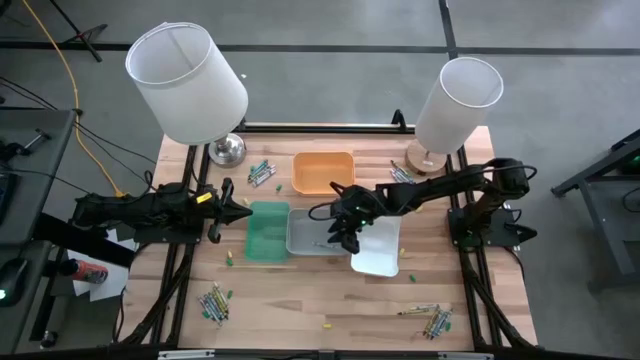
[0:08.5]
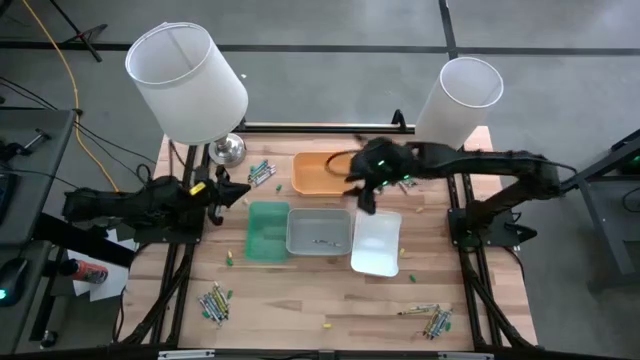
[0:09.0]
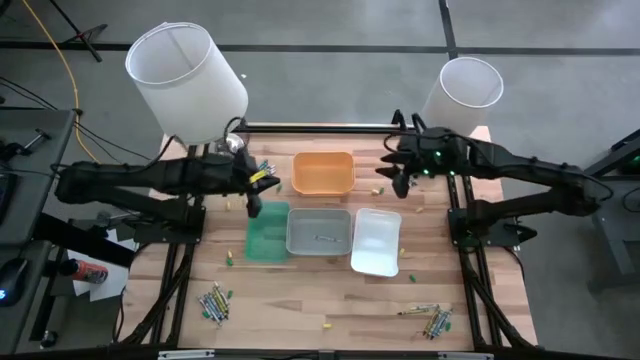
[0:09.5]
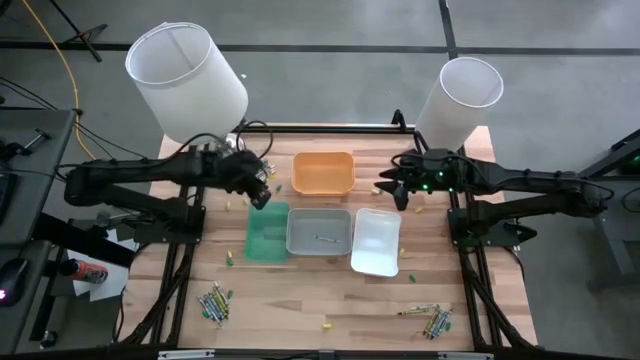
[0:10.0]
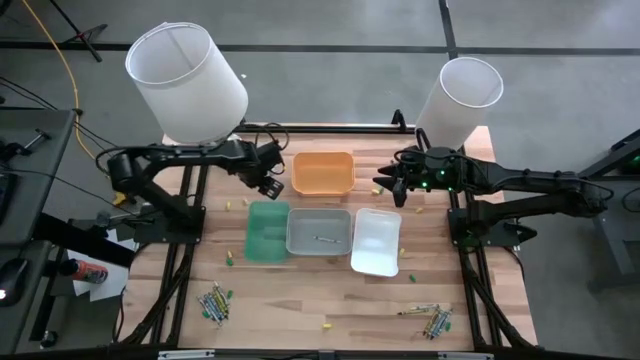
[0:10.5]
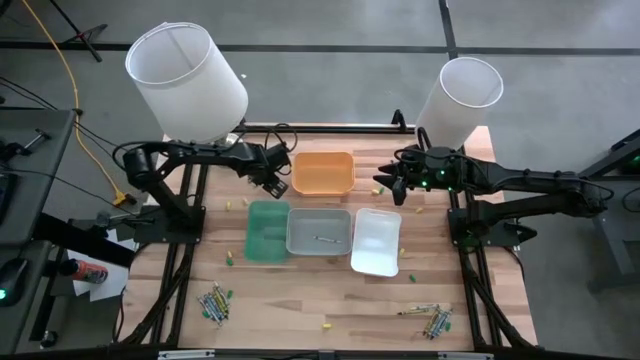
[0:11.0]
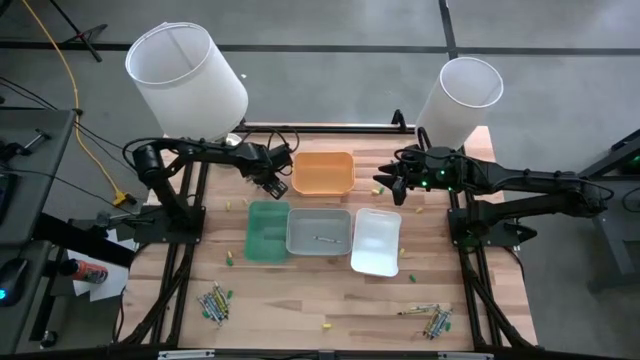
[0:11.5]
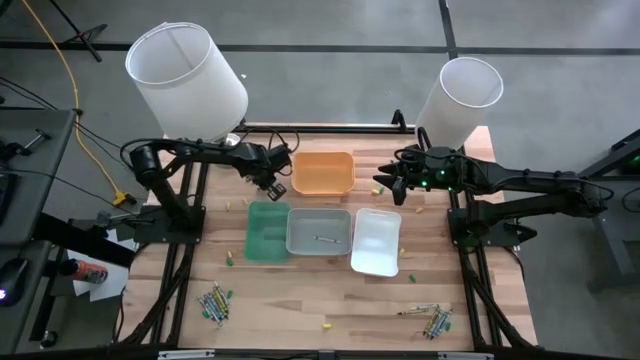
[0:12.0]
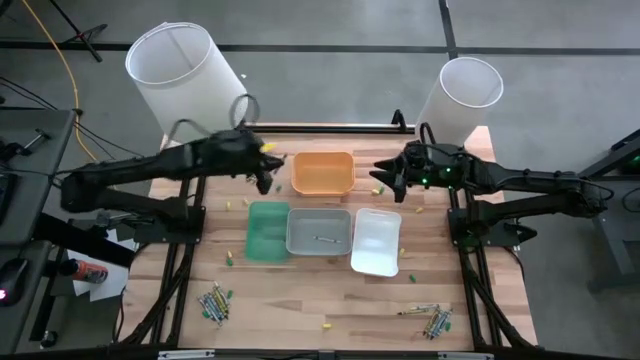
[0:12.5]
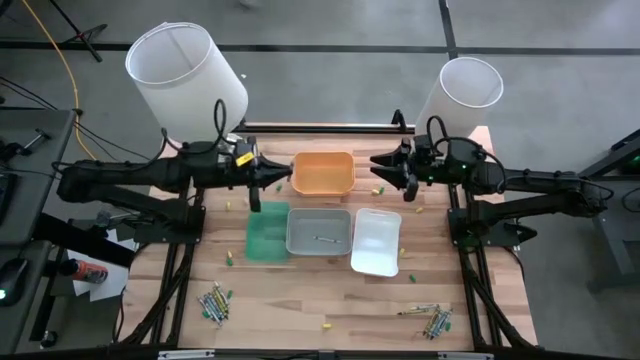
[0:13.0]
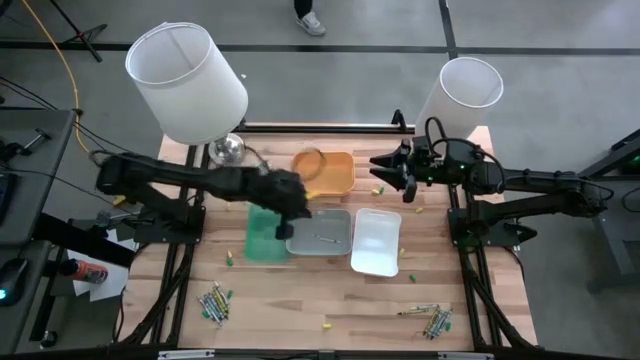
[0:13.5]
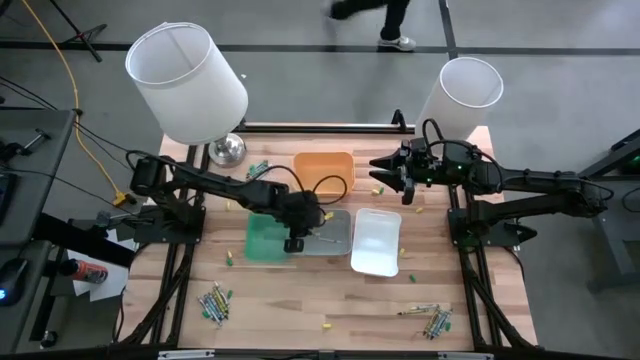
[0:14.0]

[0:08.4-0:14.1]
Task: Sort crayons
Put the white crayon into the gray bin

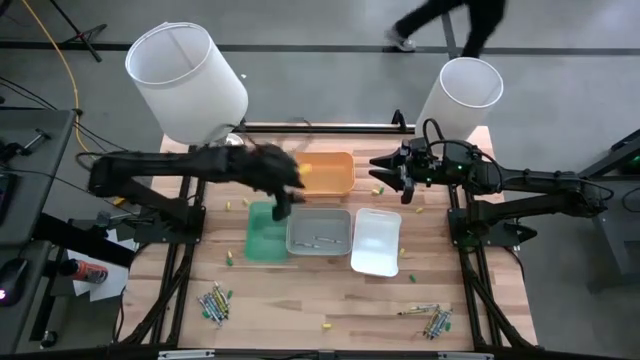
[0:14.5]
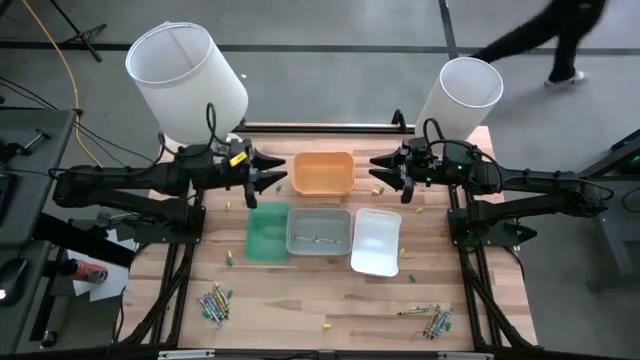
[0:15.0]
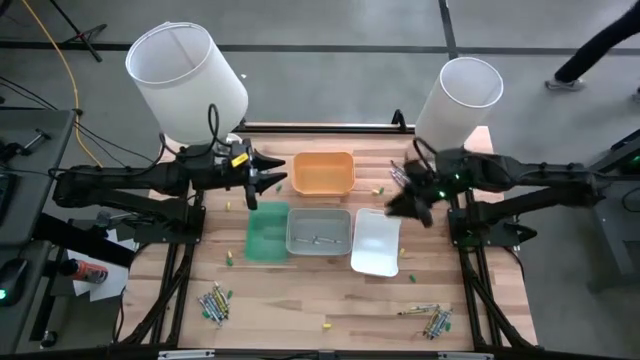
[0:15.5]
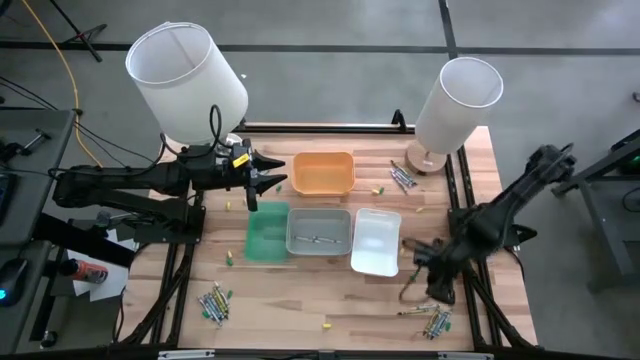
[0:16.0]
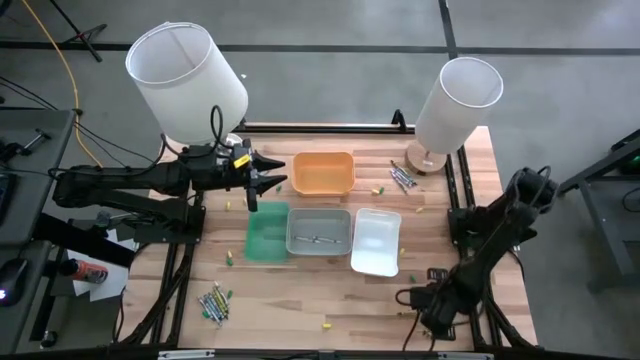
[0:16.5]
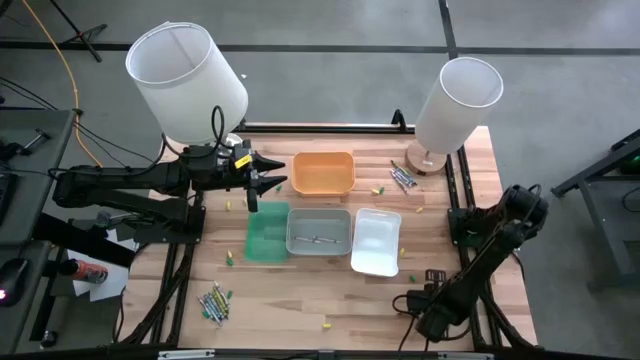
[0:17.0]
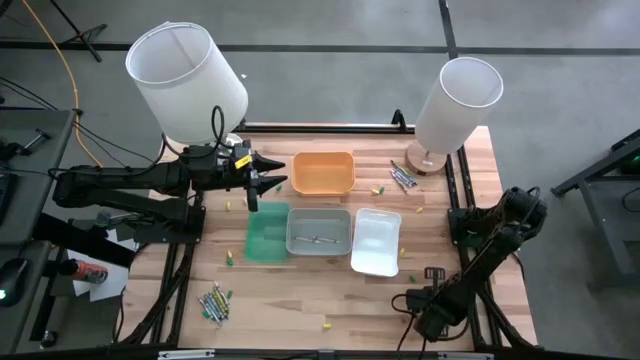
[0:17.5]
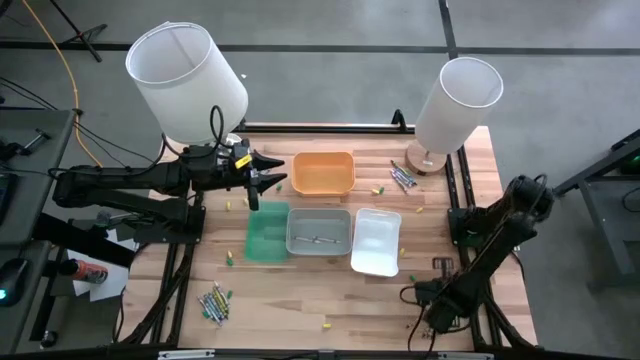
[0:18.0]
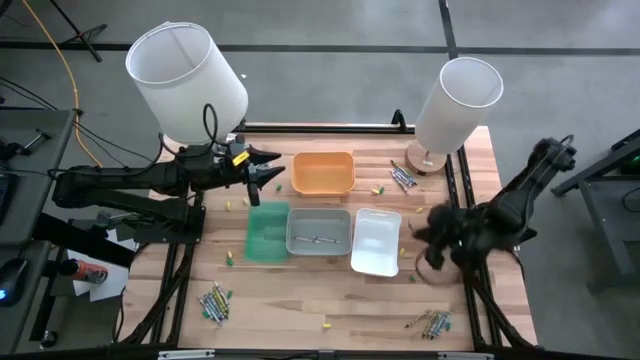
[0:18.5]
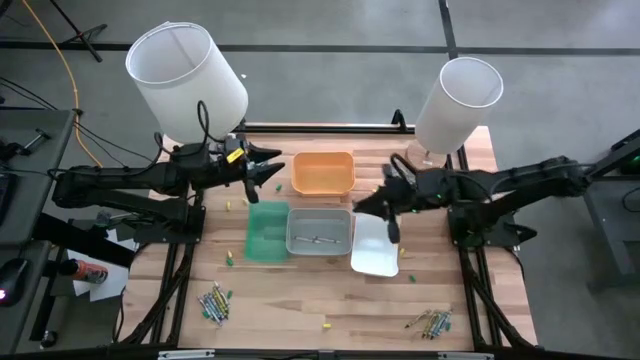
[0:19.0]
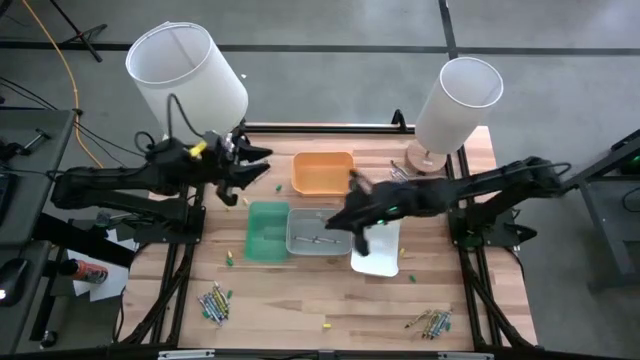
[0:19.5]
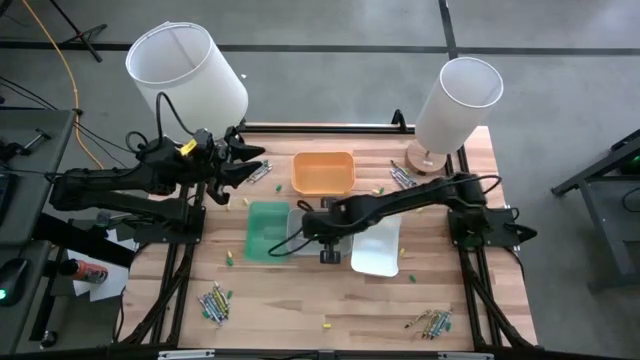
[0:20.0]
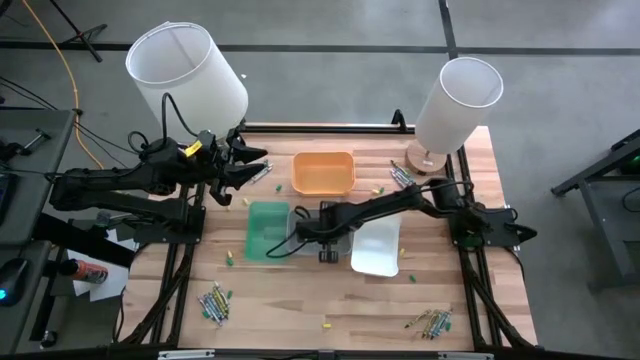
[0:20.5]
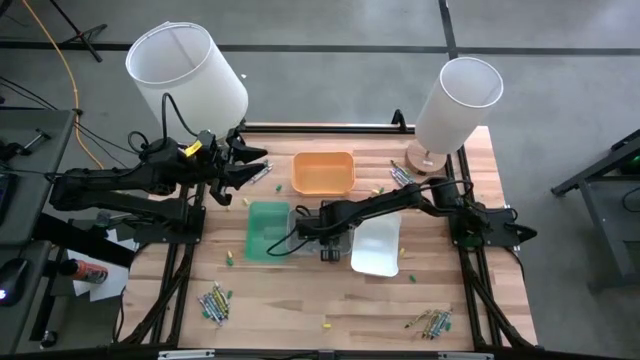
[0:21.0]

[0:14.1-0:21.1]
Put the white crayon into the gray bin

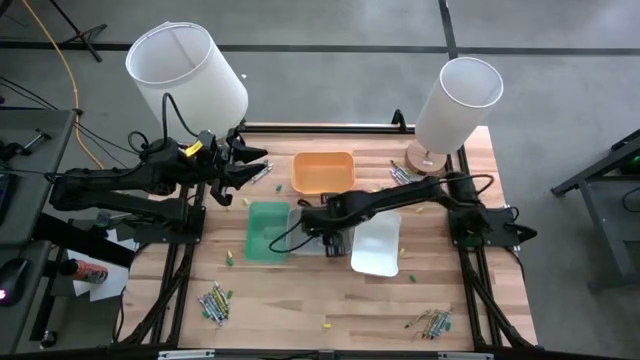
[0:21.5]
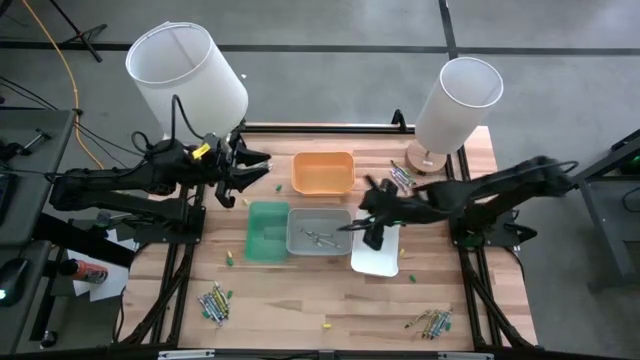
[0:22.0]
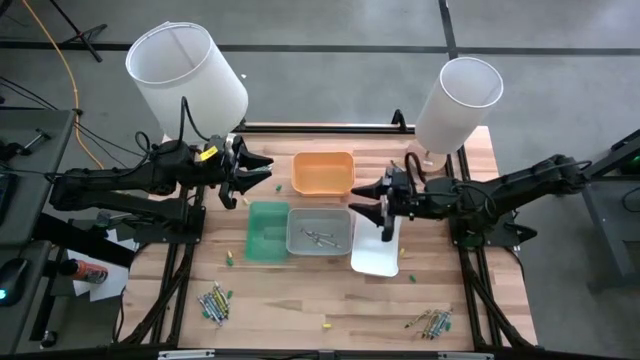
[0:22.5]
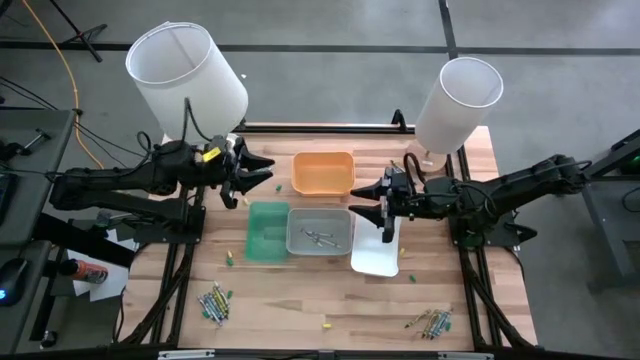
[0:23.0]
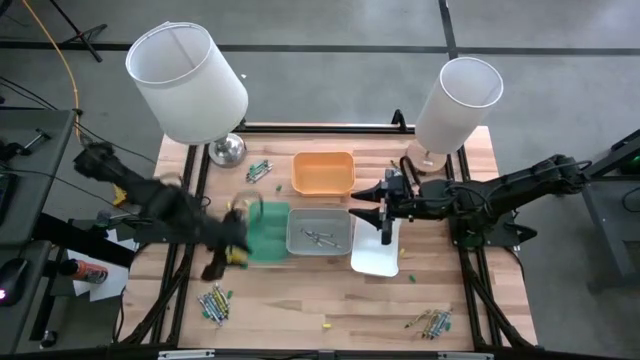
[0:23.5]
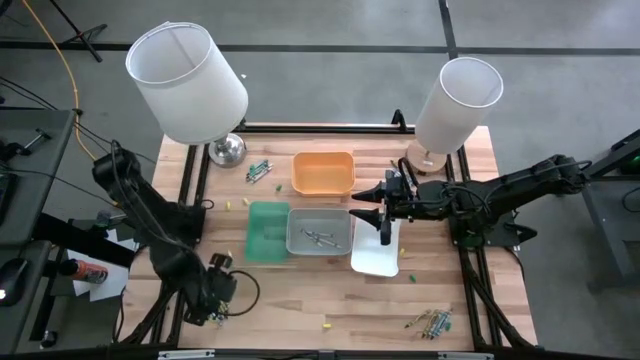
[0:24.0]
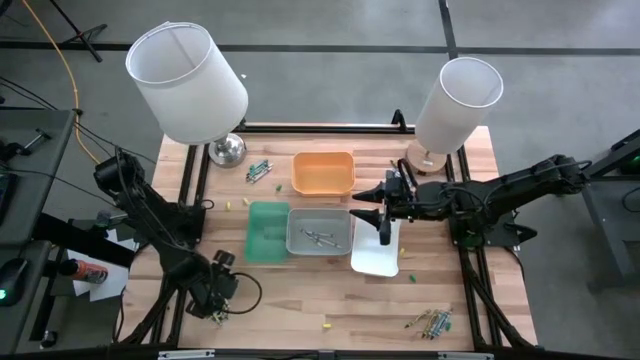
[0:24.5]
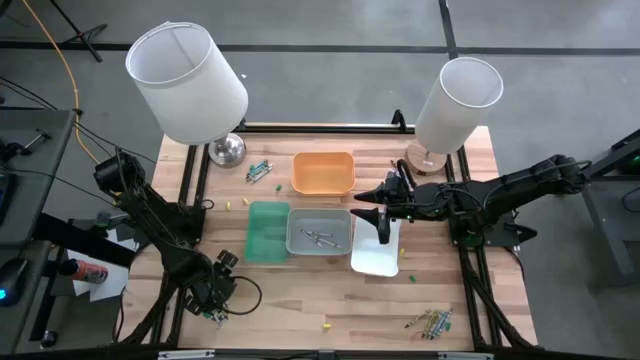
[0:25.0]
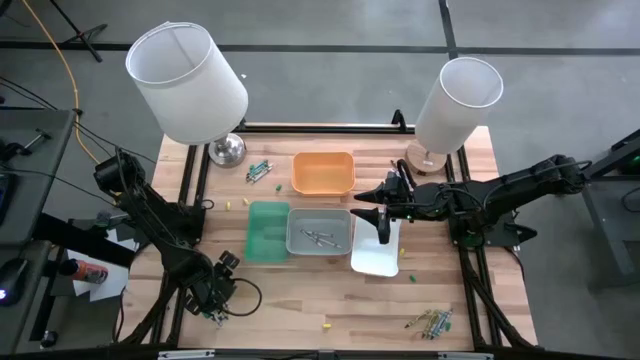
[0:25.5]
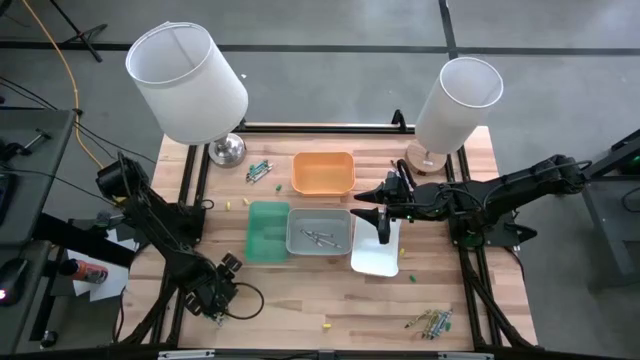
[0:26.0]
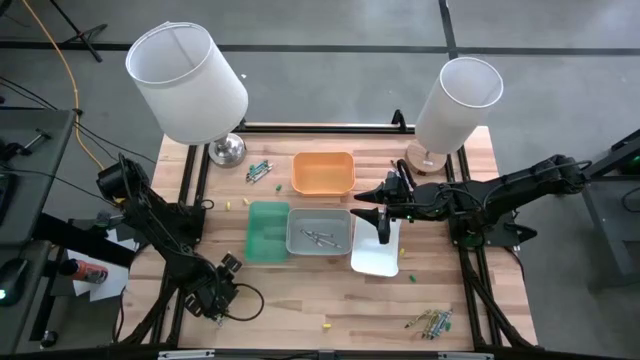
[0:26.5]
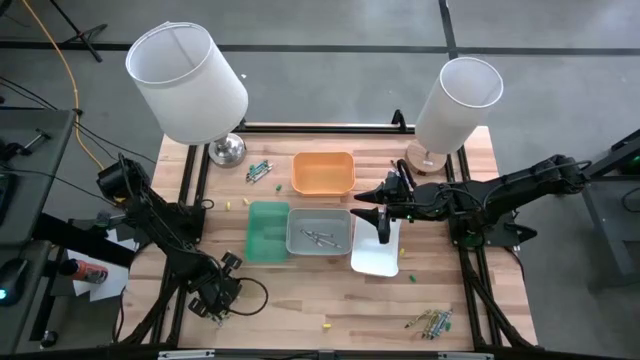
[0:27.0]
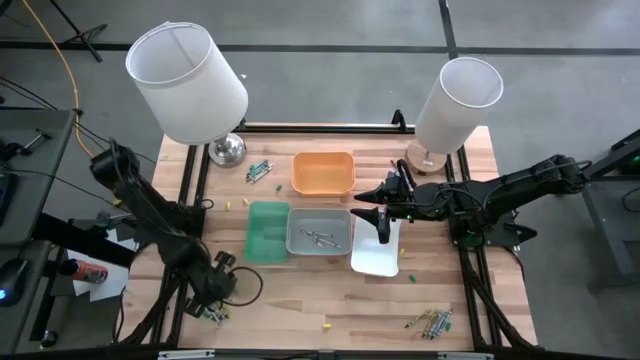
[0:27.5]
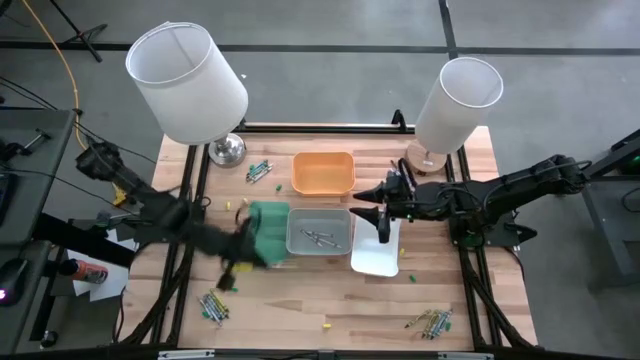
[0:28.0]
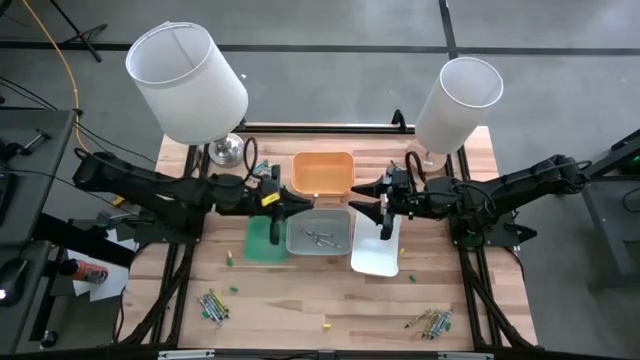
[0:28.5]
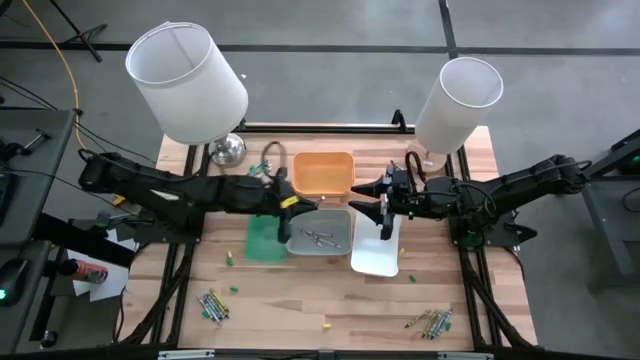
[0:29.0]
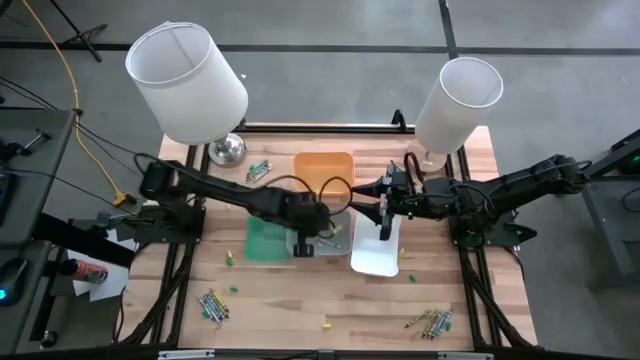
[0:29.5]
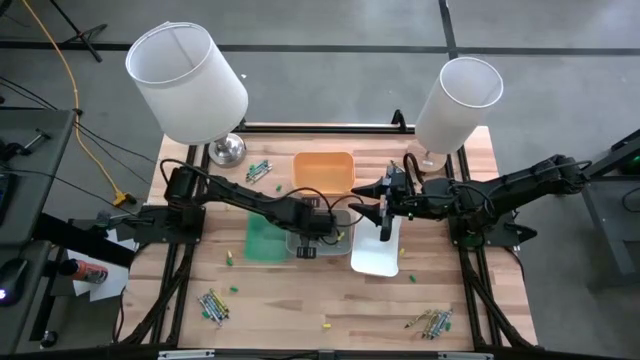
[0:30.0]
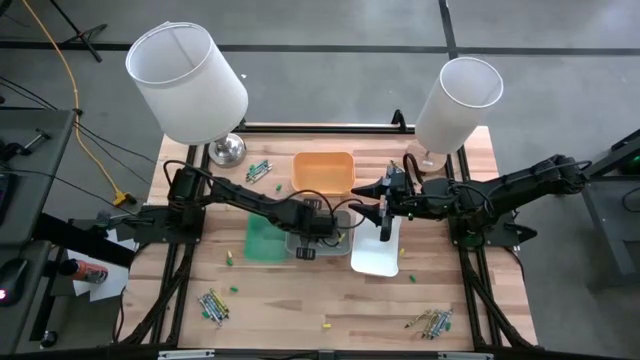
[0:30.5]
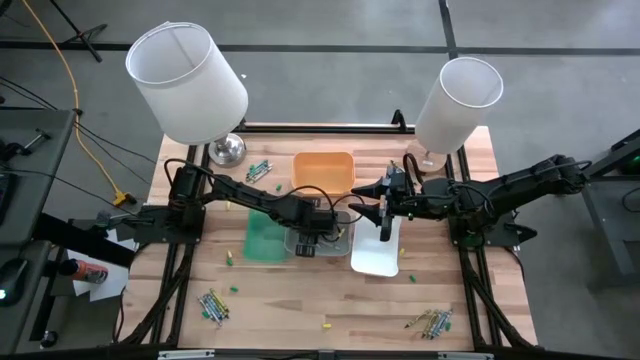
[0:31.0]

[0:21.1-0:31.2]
Put the white crayon into the gray bin
